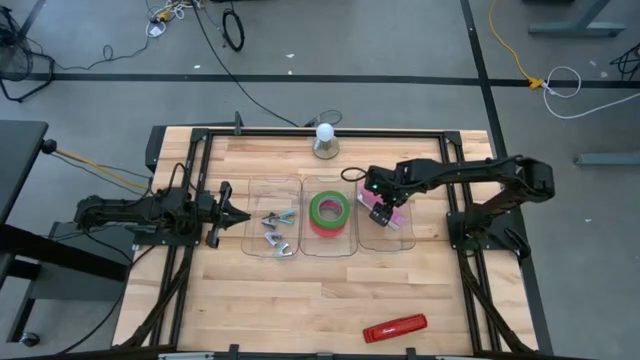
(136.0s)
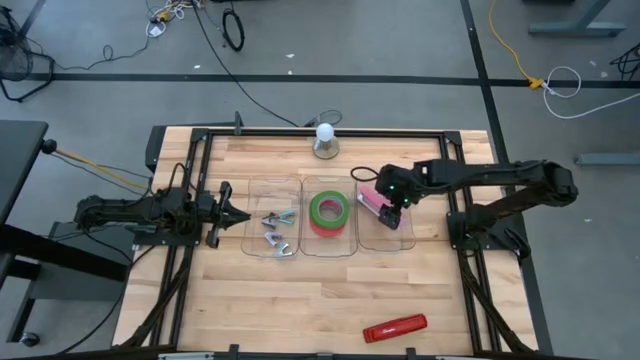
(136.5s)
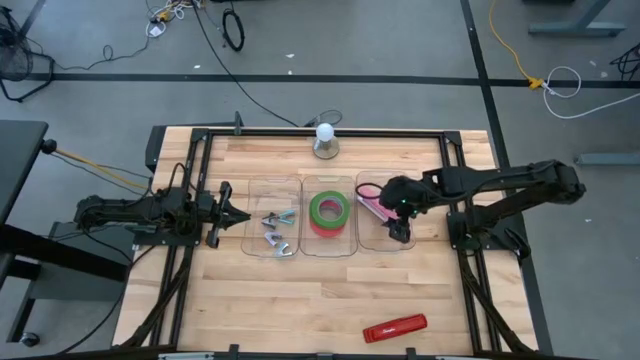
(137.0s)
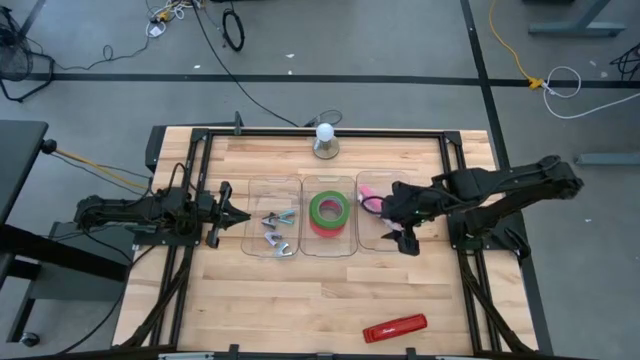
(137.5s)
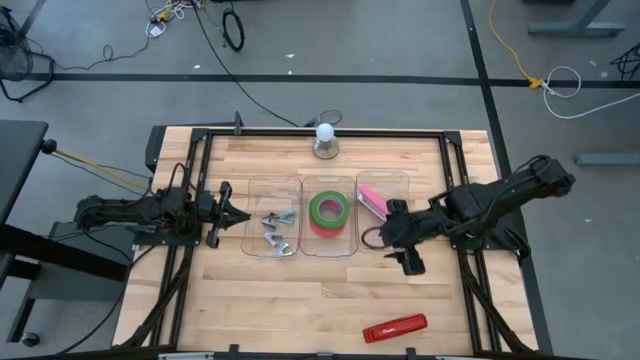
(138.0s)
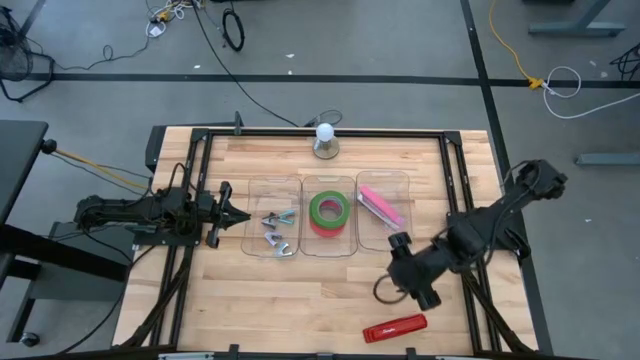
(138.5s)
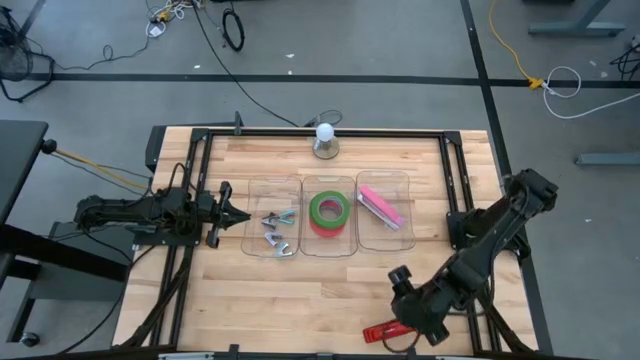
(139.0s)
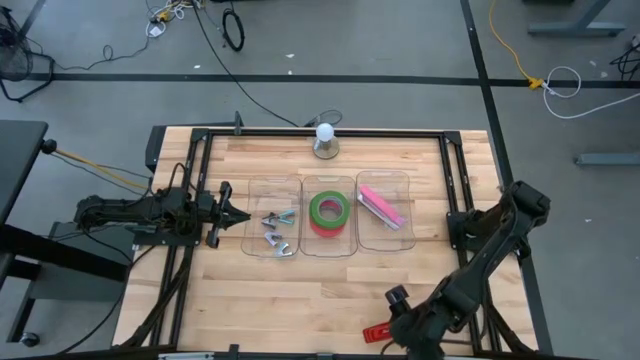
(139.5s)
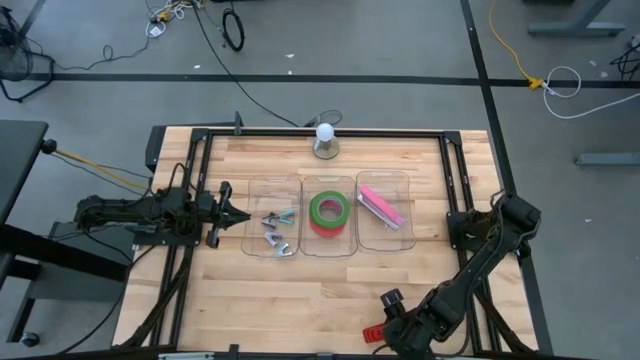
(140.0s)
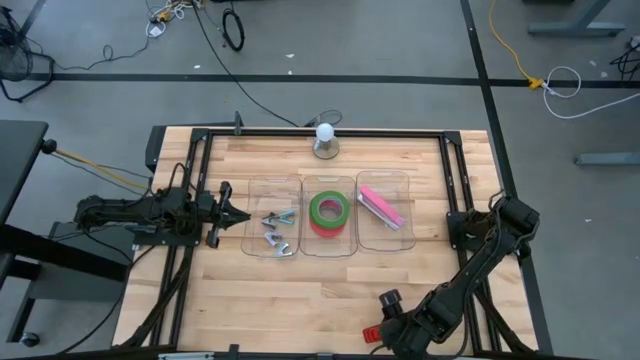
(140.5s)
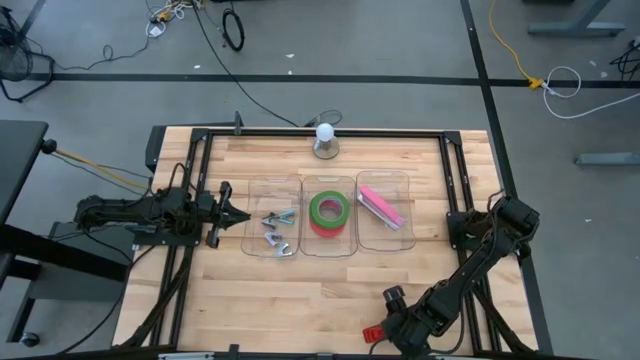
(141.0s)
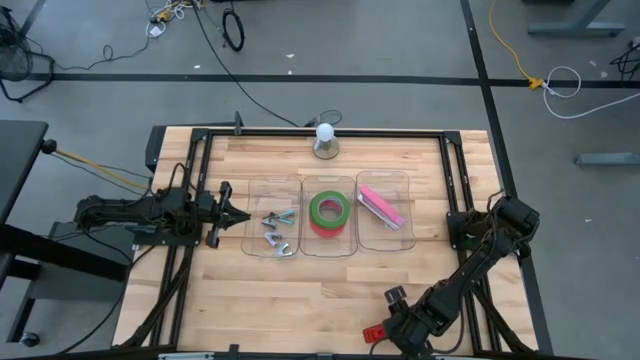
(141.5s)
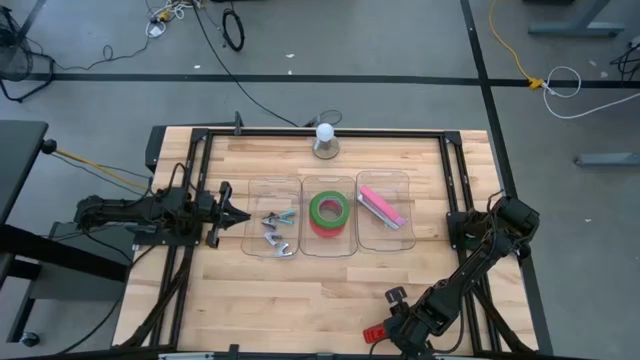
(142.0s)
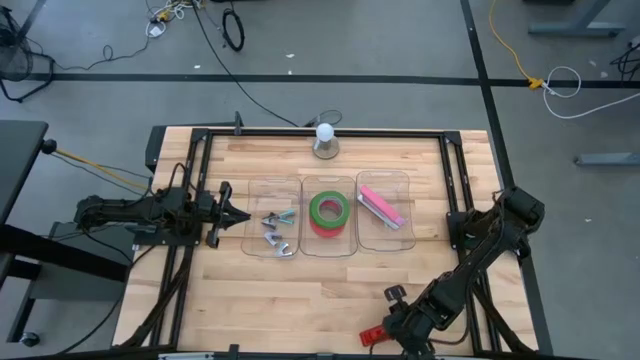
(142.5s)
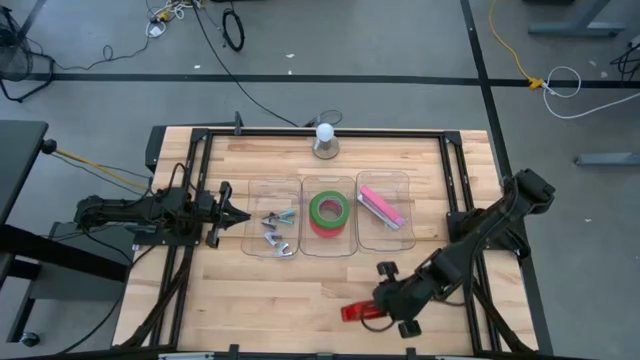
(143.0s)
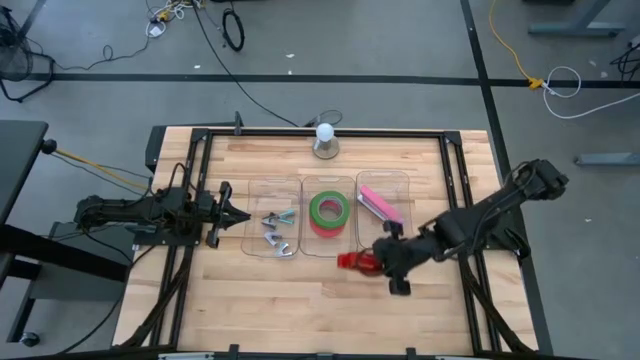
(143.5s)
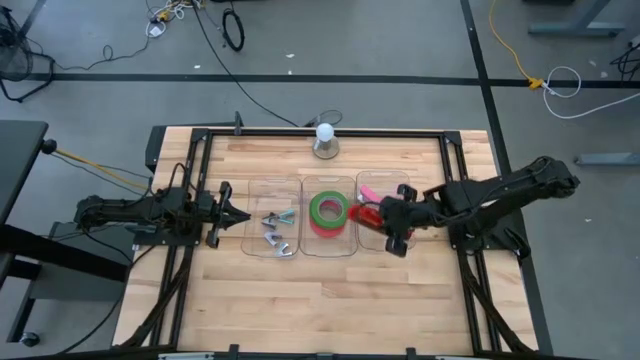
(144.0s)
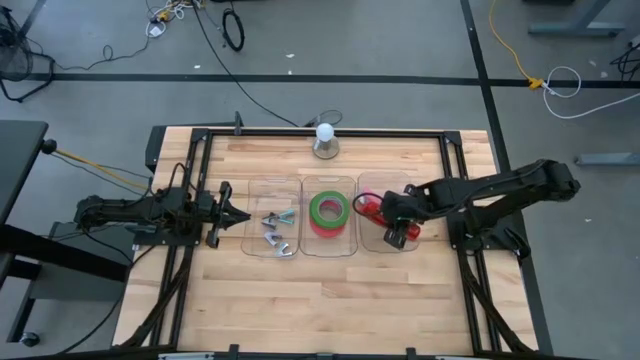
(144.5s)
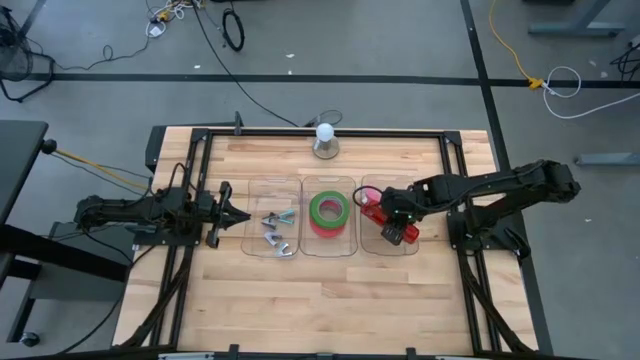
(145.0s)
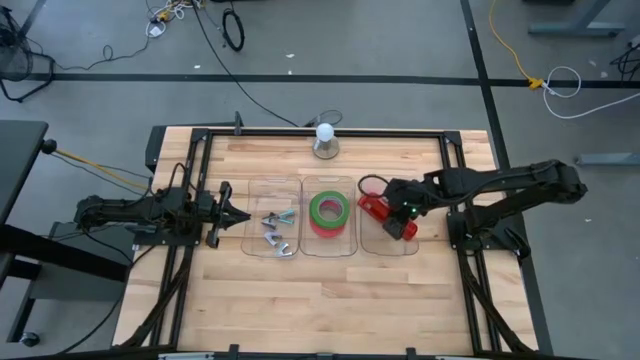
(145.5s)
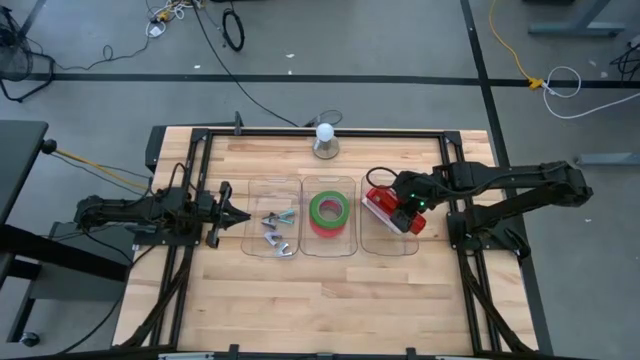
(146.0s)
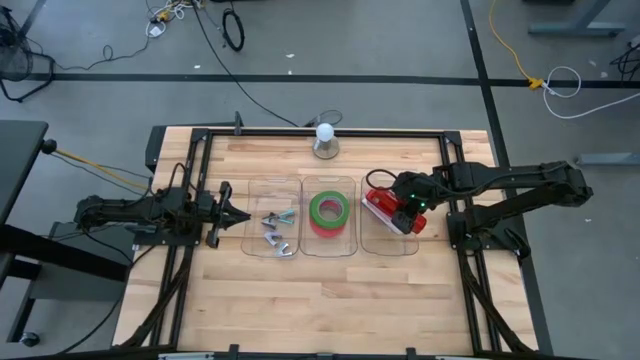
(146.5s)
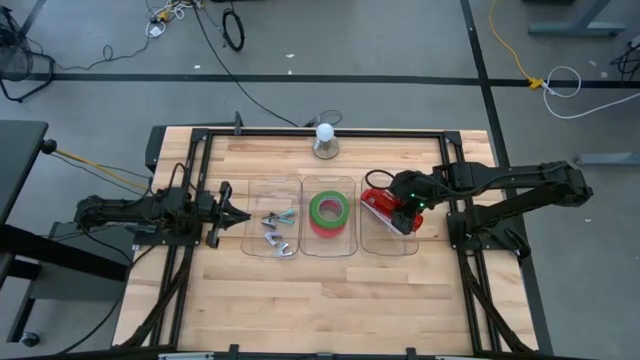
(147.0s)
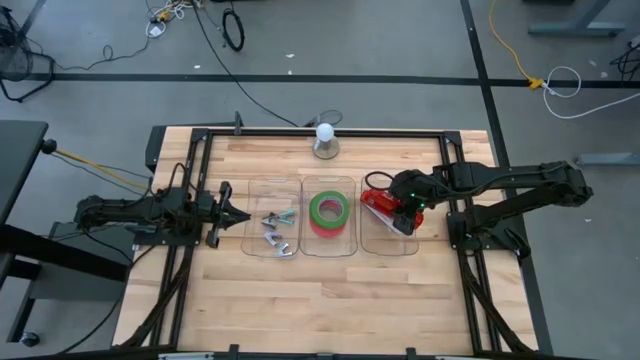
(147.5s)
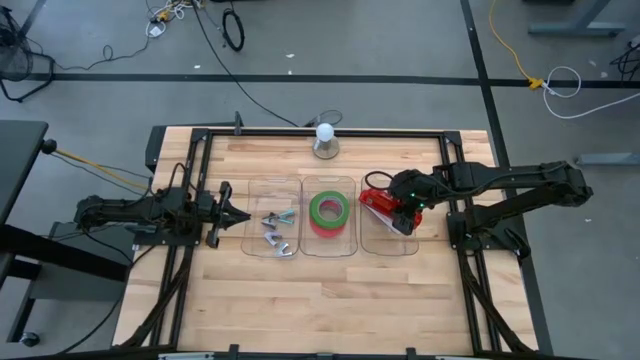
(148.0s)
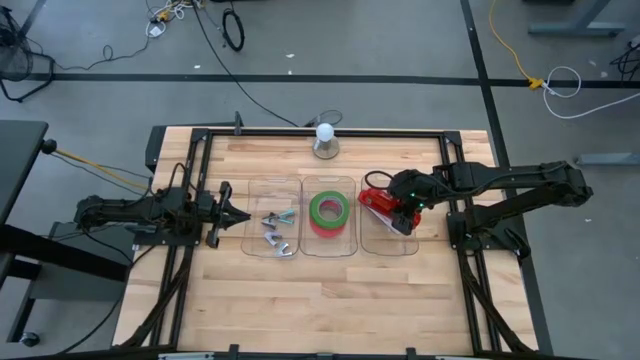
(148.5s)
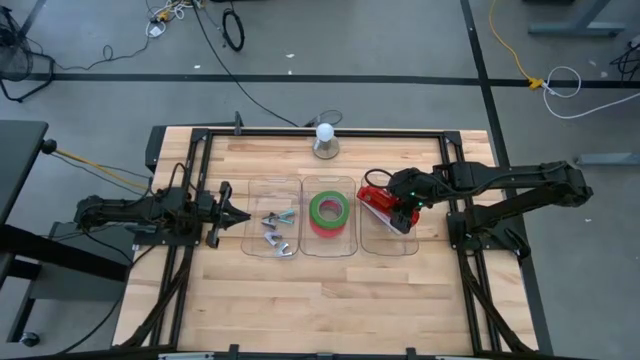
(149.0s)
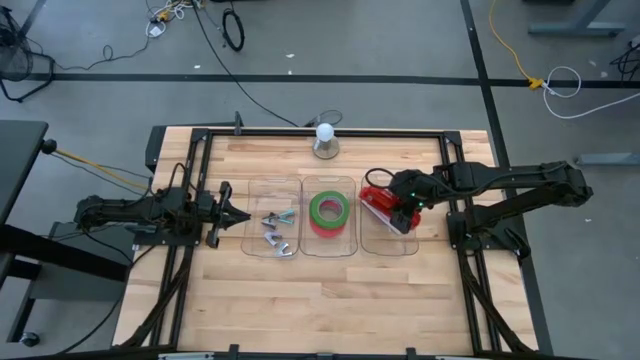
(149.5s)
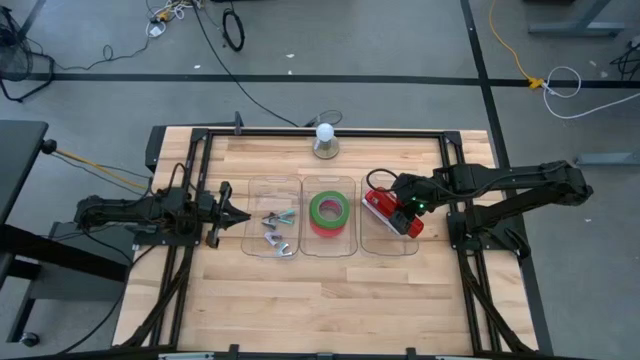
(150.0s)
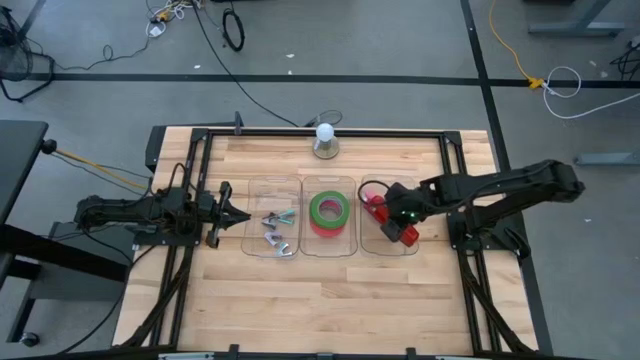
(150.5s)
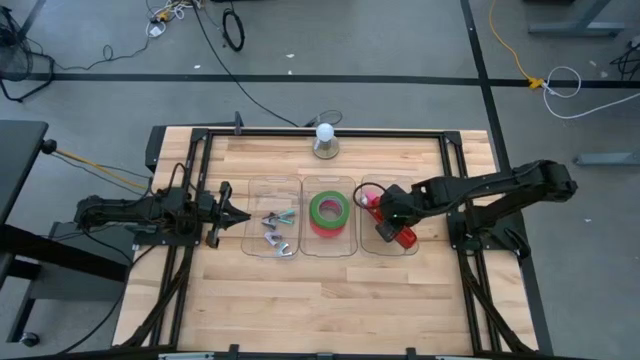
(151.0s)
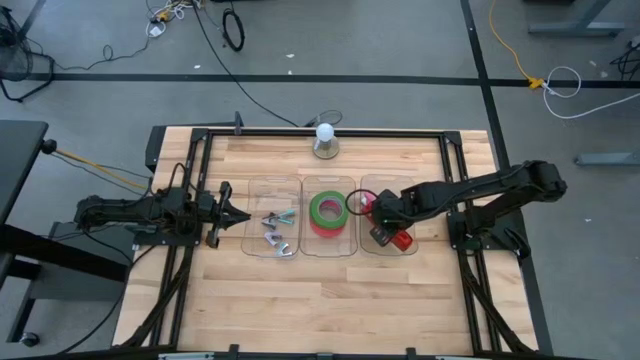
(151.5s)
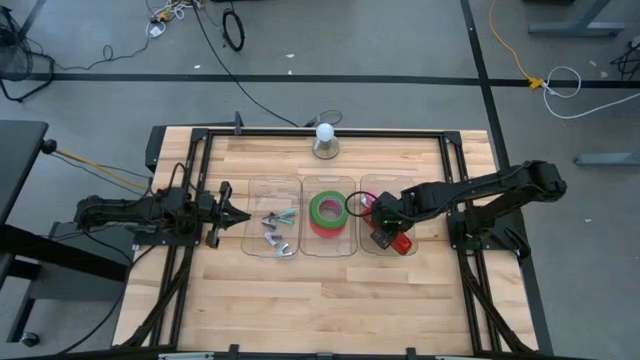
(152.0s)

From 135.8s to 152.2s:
Task: Pick and place Stapler, Stapler remover, tape
Put the red stapler into the right transparent bin

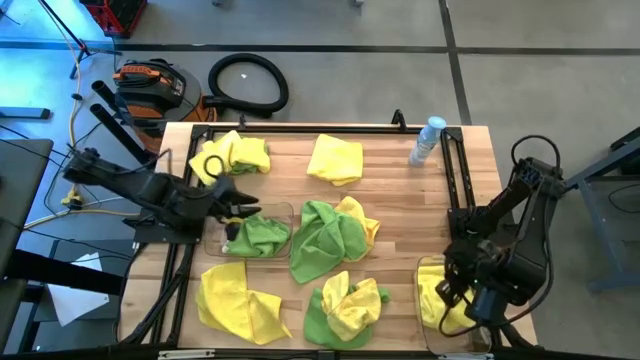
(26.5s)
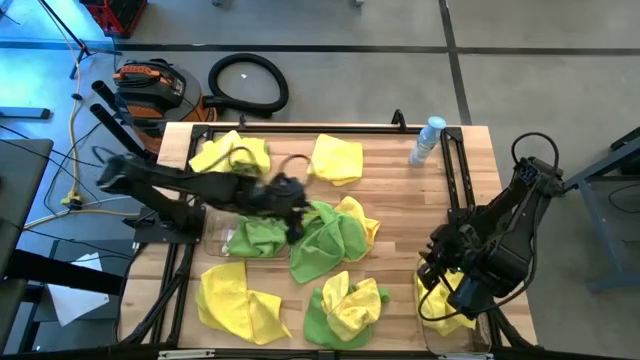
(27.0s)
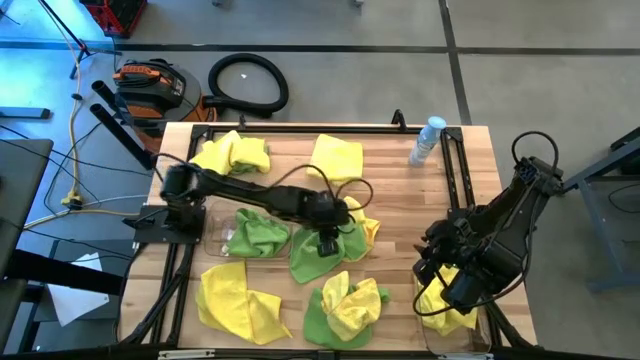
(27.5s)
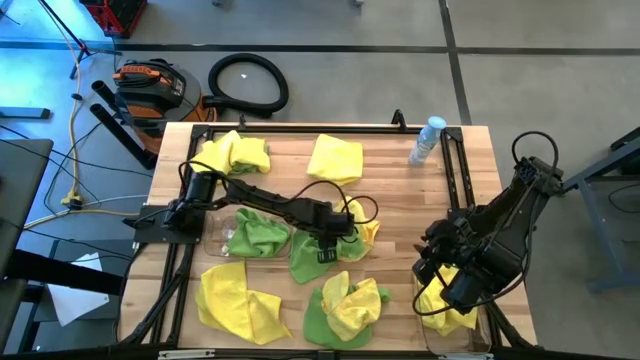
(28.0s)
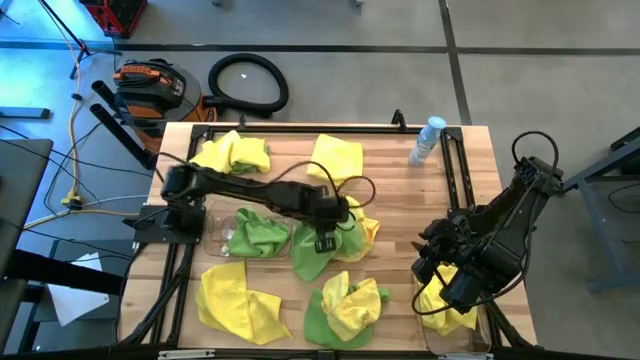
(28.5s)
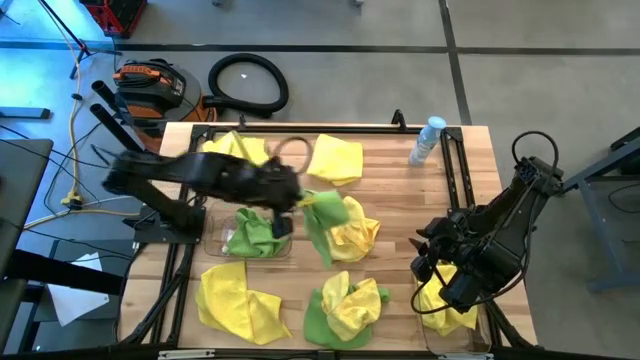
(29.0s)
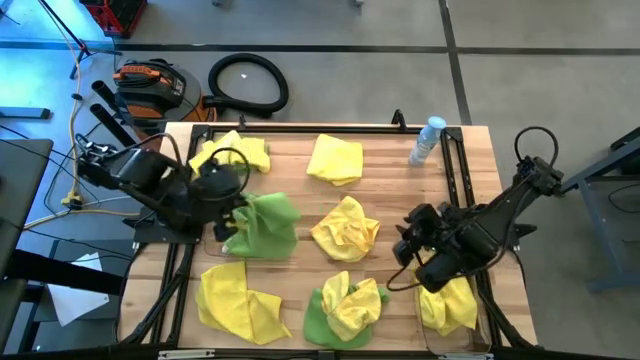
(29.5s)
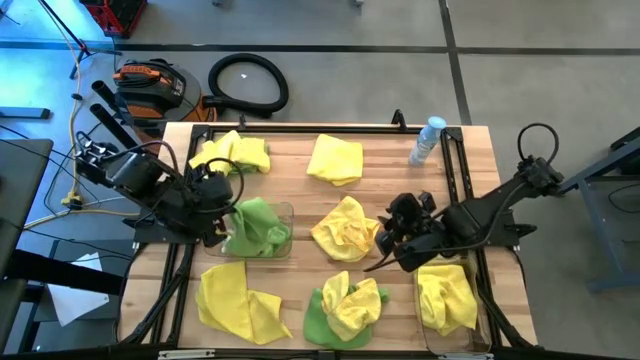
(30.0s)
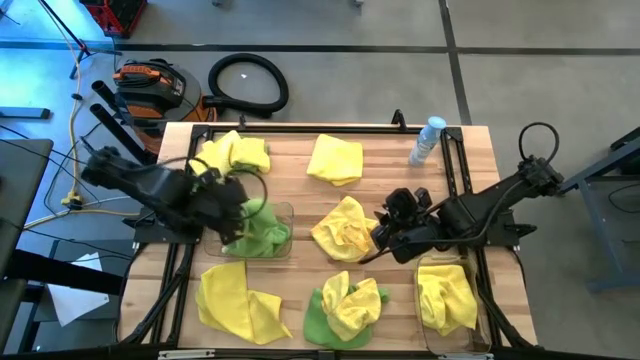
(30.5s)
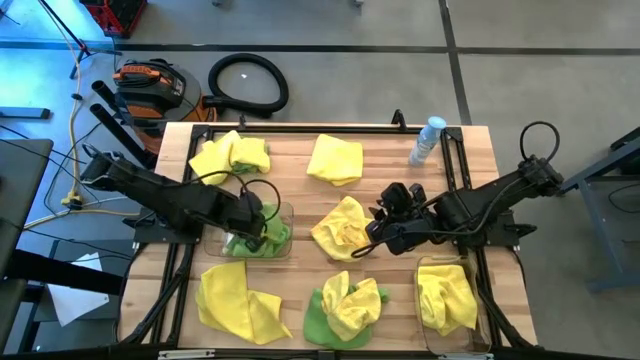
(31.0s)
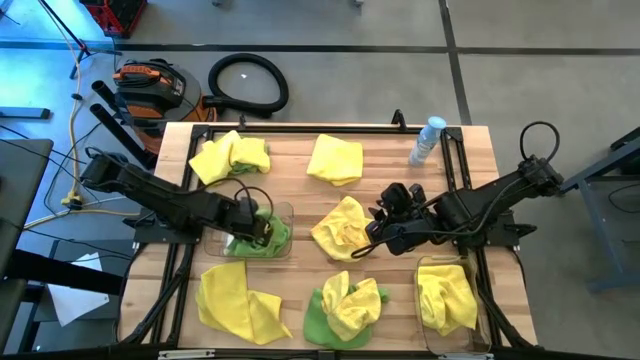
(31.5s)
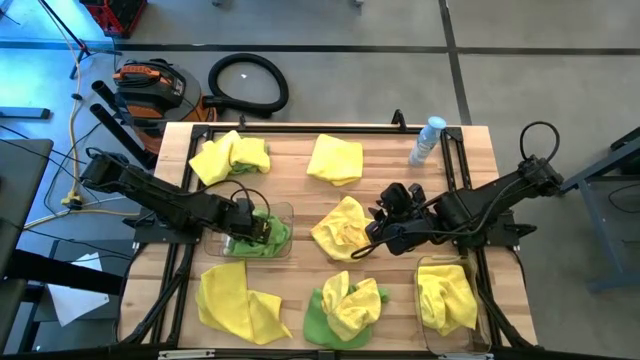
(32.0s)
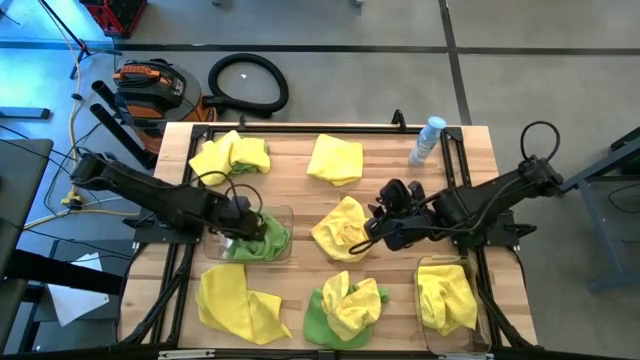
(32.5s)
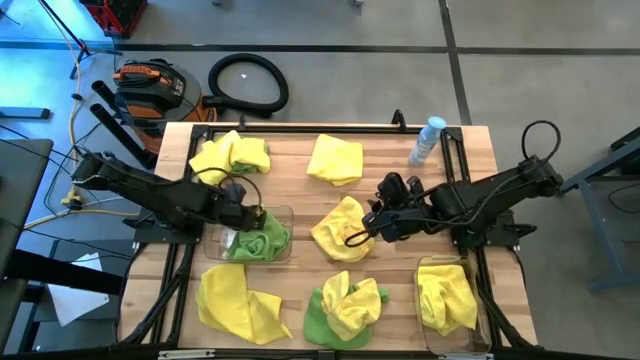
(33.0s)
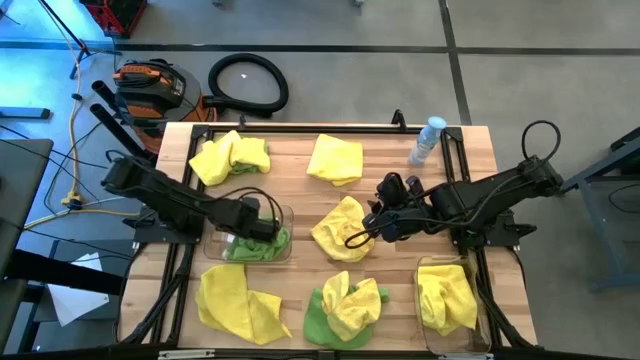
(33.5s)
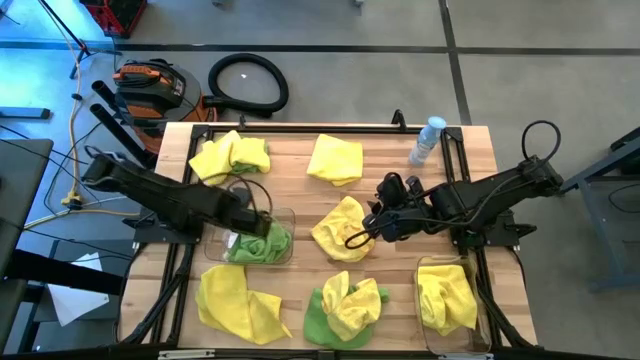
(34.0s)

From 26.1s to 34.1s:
Task: Sort microfiber towel by color & place in baskets
Put the green towel into the left transparent bin
